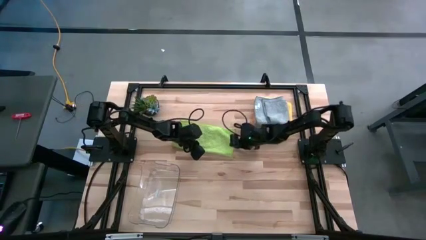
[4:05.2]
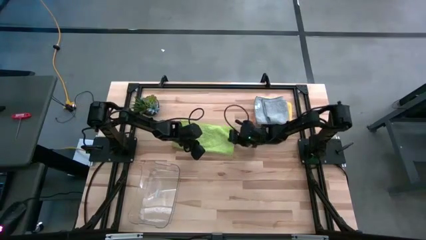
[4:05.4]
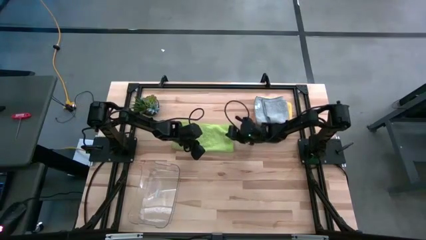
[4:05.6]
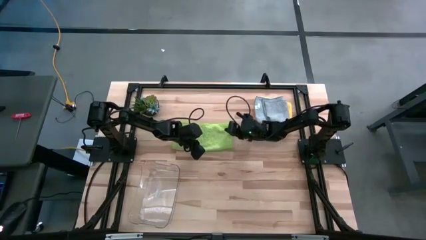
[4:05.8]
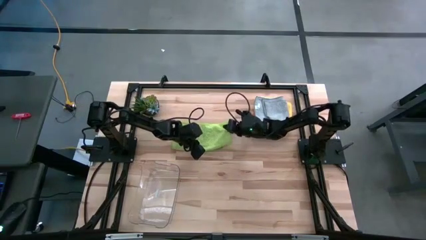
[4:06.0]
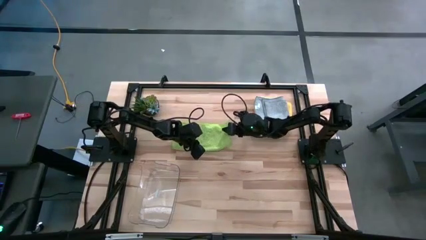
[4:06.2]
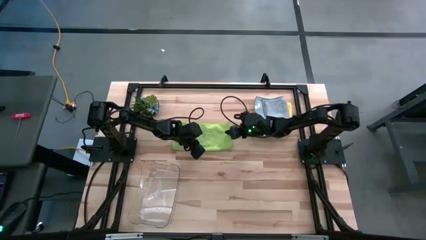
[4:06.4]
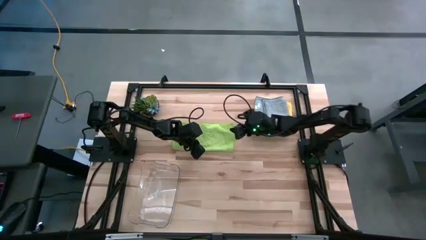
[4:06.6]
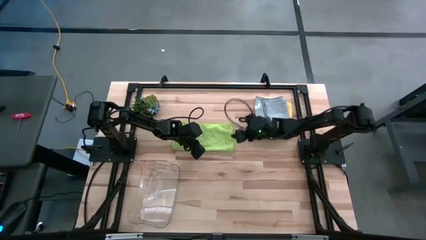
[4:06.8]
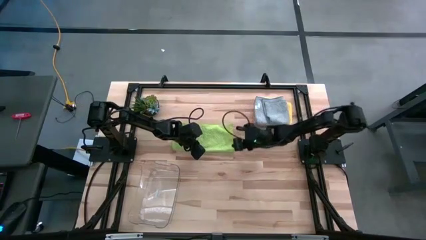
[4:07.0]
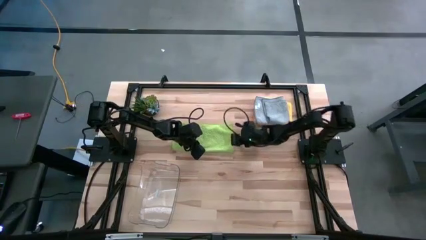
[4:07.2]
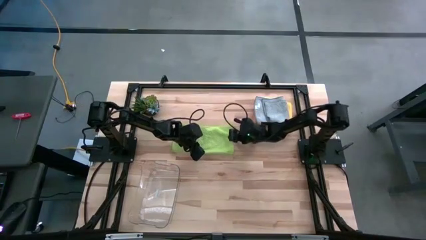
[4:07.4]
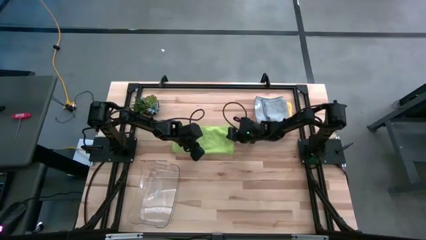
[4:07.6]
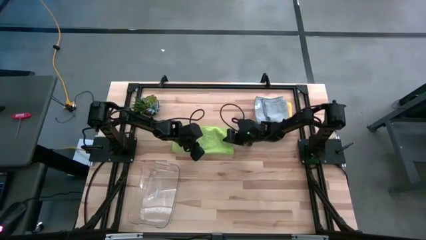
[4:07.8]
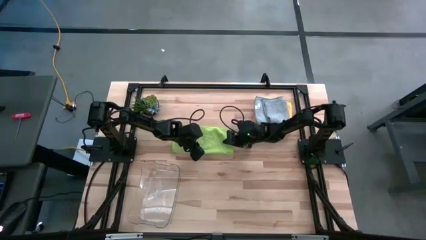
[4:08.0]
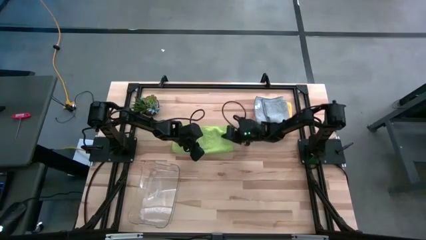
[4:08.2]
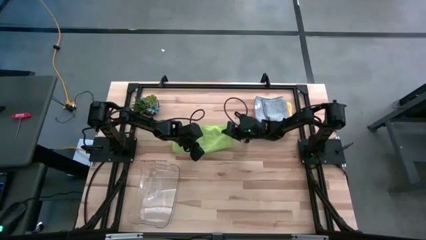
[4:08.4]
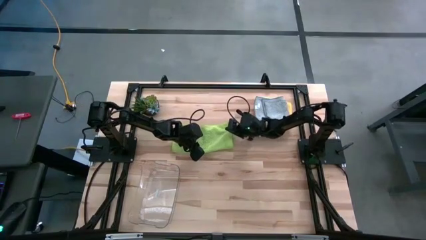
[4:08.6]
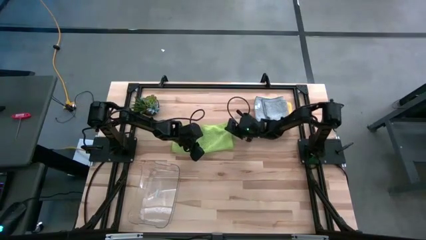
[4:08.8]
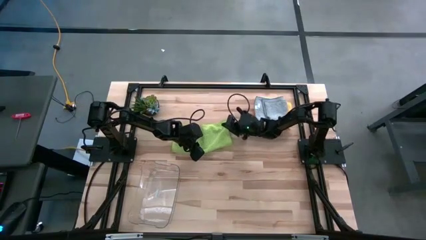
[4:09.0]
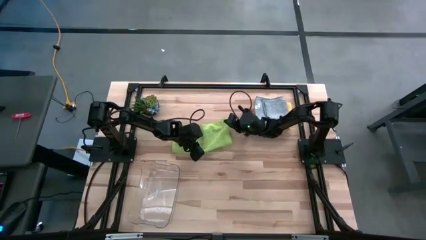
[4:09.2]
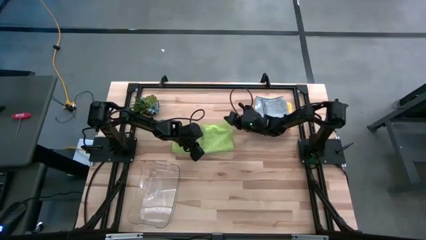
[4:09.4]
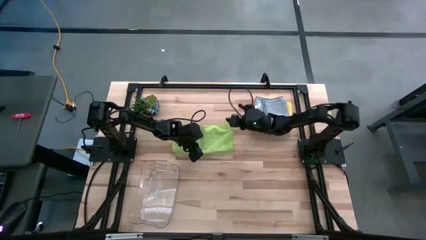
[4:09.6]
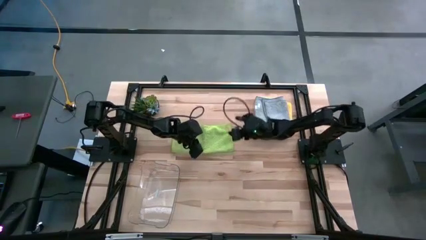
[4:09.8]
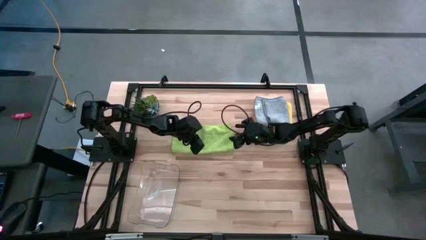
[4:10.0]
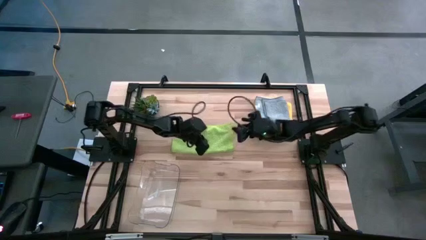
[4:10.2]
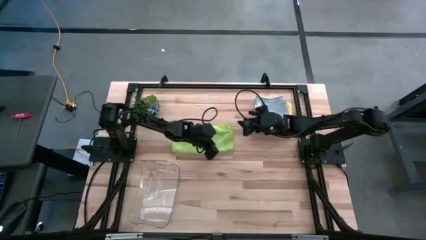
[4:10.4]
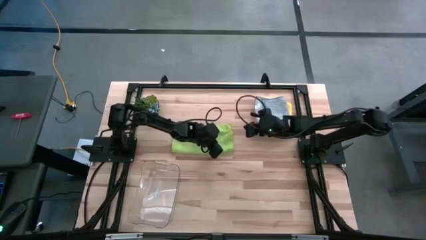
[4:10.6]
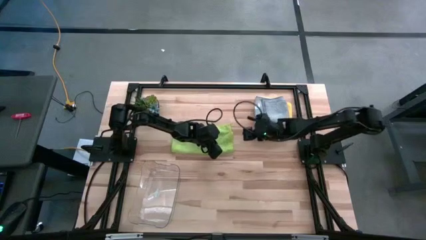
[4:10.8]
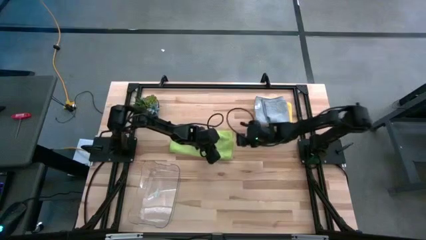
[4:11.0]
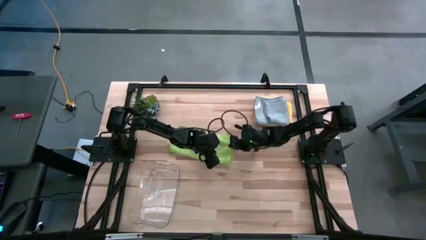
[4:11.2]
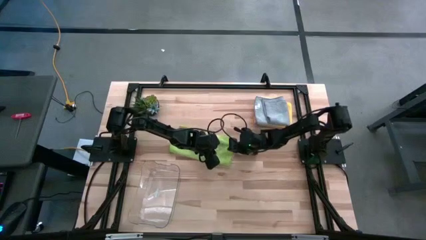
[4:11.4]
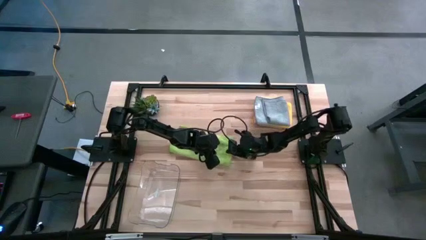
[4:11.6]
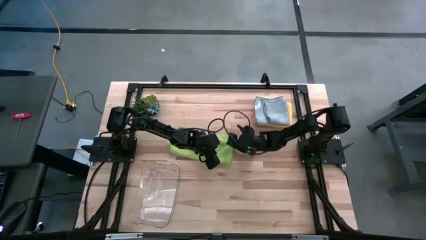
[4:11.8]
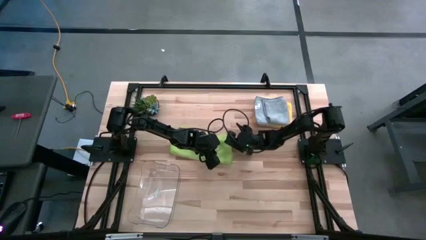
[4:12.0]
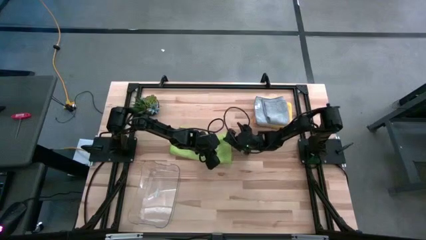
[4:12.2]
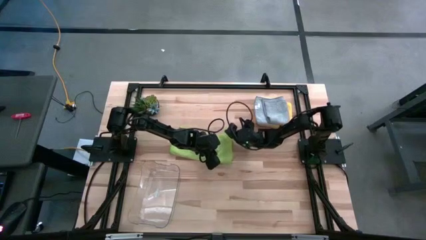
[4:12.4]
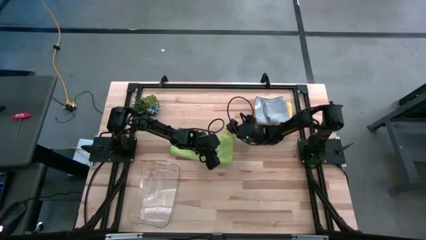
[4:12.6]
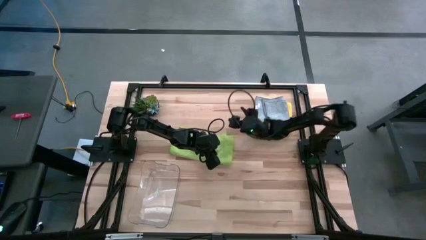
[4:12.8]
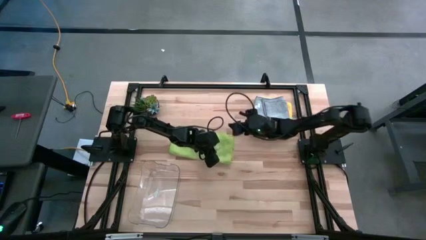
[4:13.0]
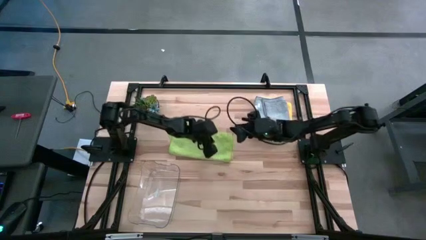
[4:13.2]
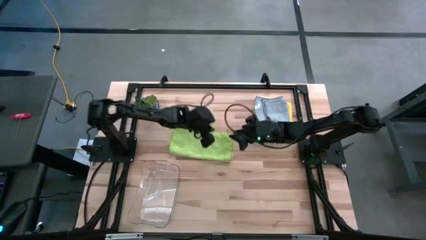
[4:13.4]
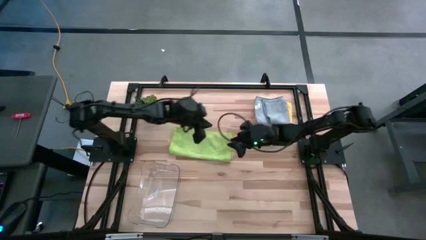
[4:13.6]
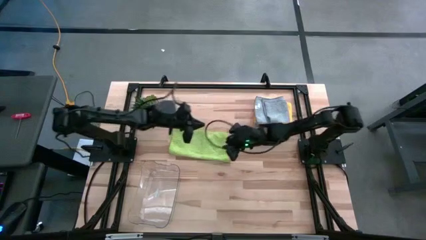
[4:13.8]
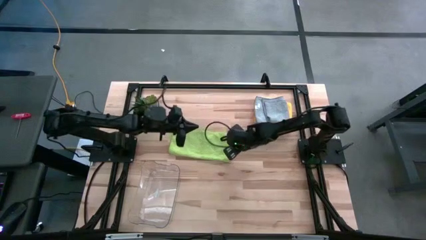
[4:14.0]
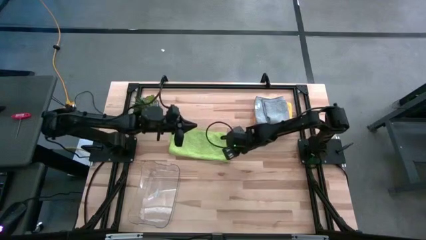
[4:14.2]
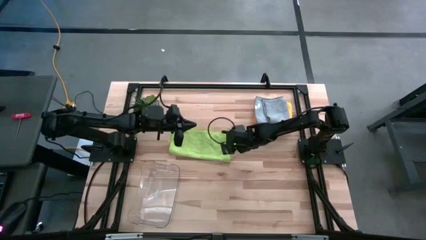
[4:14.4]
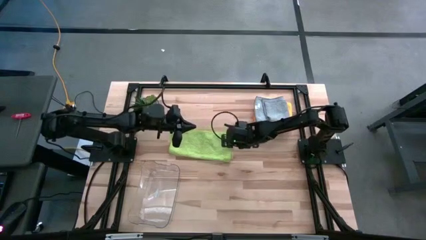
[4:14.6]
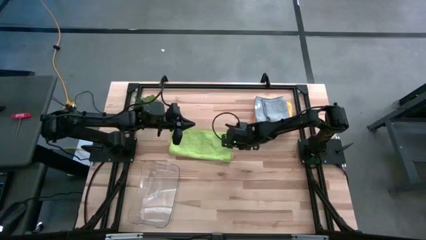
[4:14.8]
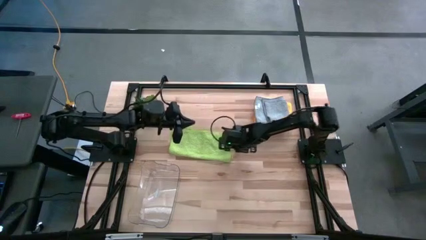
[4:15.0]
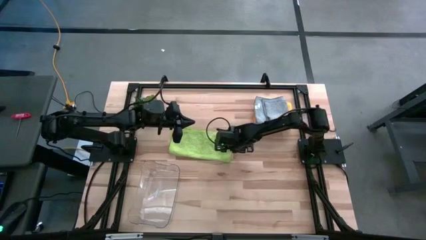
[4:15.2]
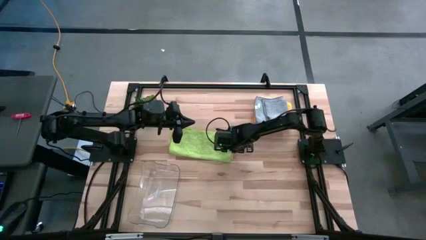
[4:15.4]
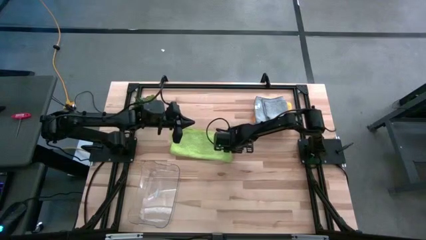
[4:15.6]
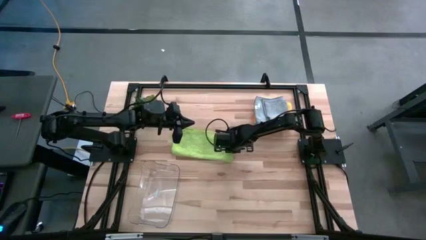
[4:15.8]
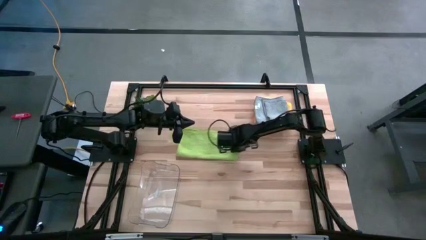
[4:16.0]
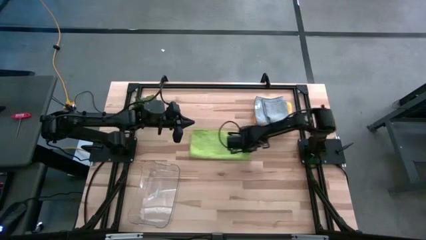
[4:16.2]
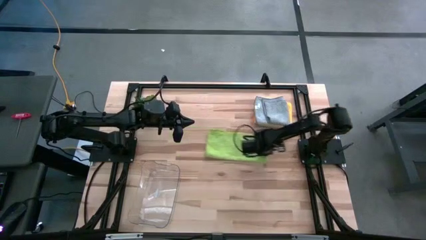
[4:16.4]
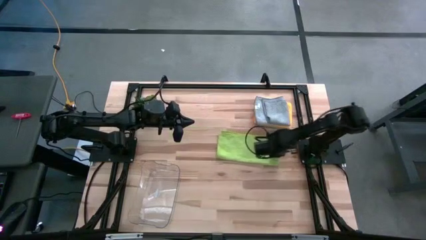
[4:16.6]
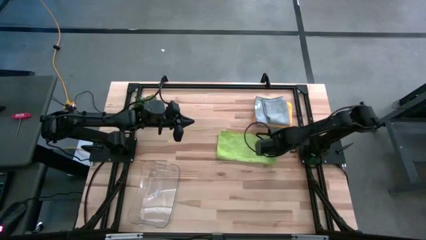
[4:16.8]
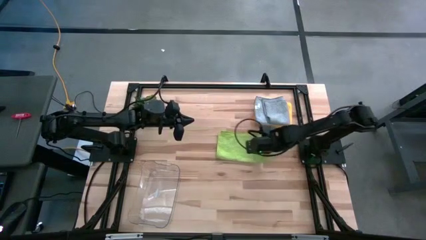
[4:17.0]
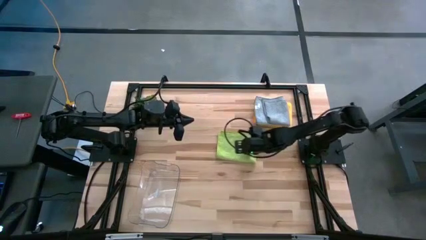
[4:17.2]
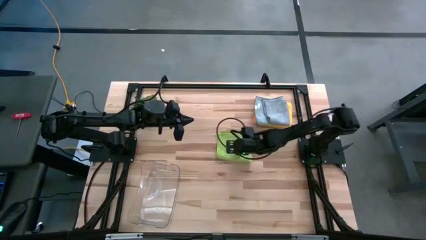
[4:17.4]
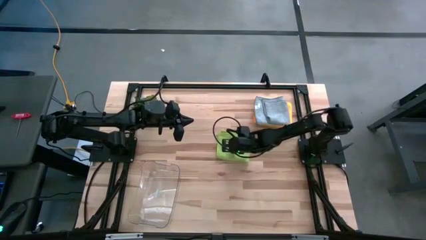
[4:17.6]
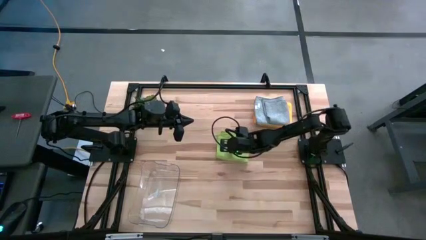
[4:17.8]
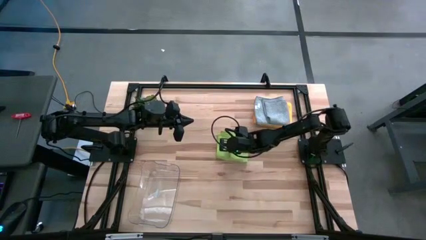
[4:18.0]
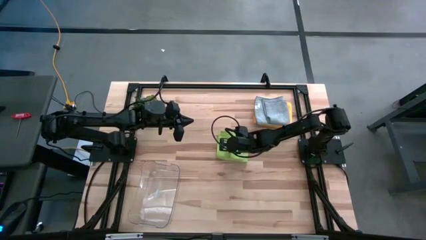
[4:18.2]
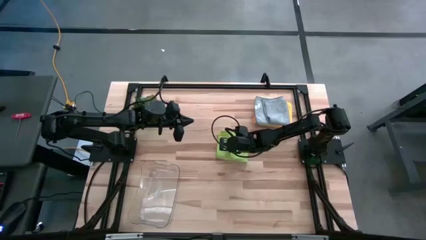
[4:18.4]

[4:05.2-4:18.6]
Task: Fold microfiber towels
Fold the green towel

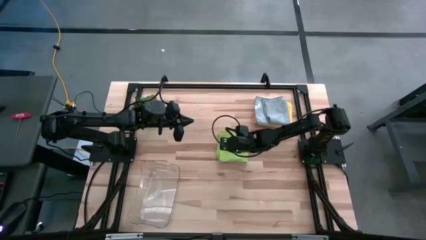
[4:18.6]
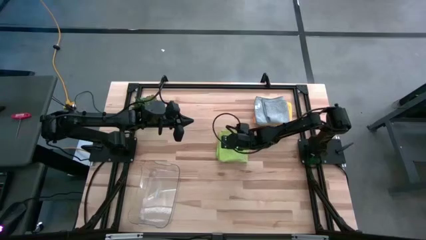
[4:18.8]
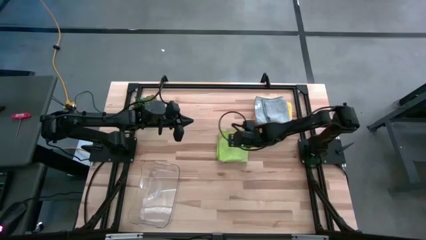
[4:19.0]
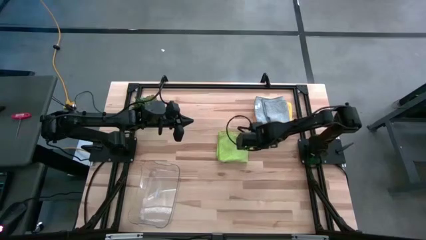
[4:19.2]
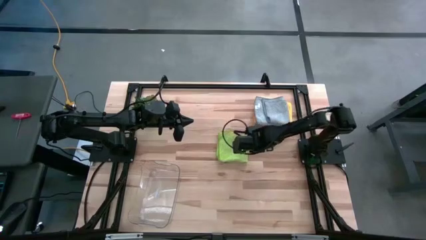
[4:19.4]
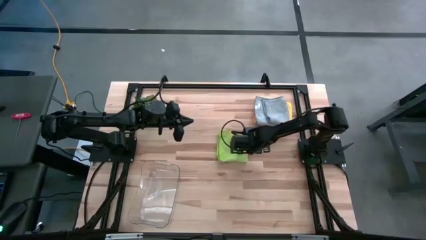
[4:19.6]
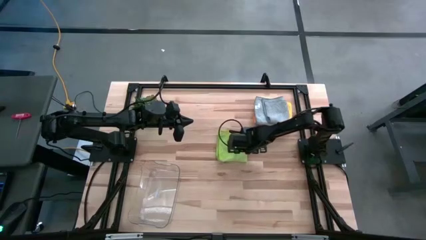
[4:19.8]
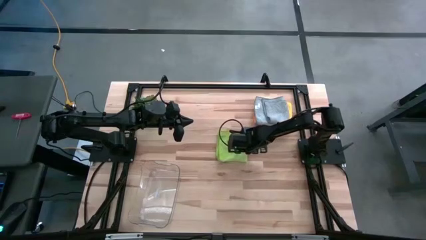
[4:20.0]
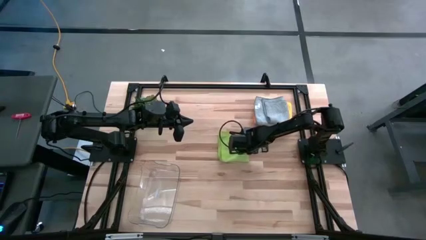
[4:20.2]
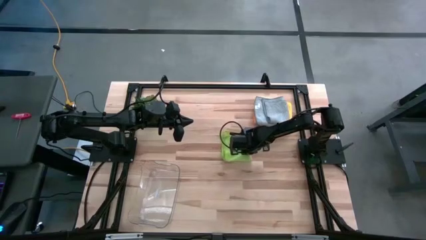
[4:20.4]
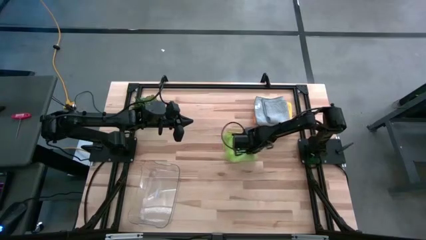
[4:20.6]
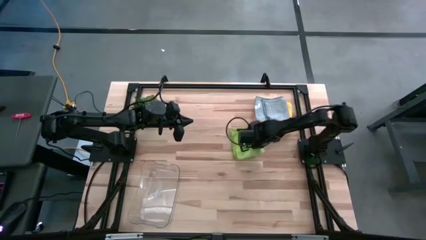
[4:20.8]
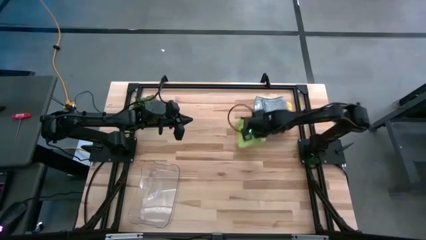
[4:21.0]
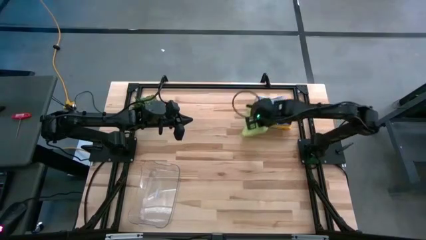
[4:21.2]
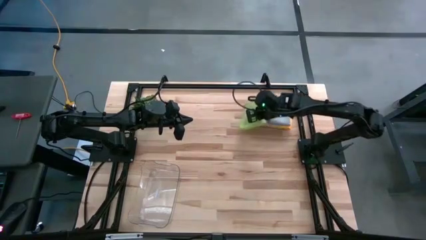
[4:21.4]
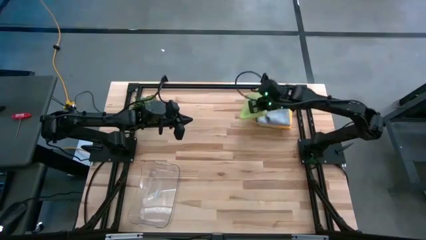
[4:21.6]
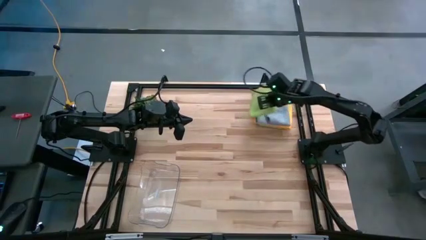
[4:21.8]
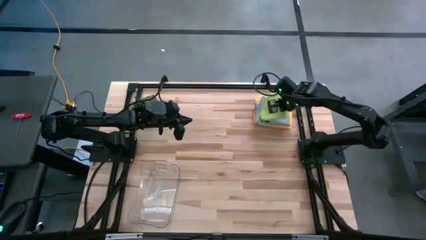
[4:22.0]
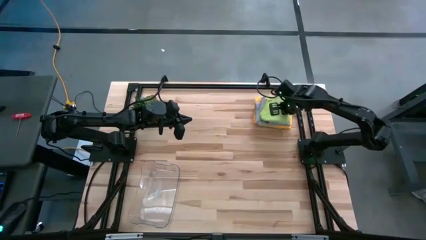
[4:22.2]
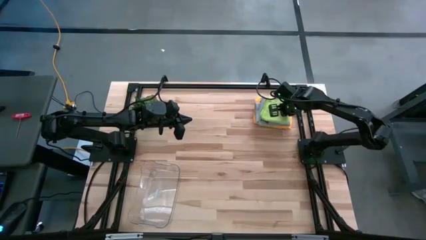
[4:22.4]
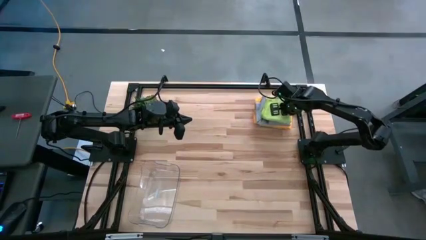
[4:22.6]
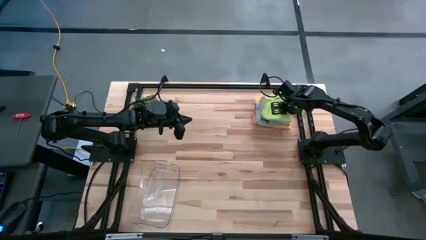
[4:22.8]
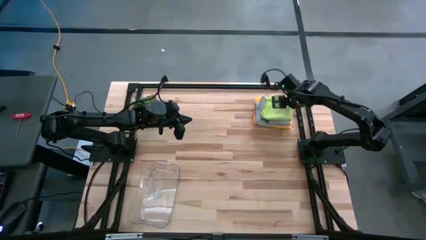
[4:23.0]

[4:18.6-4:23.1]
Stack the green towel on top of the light blue towel
